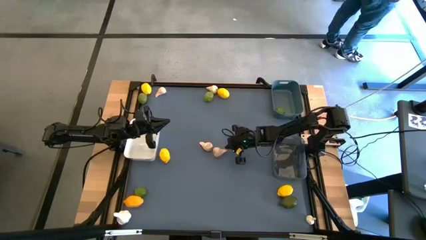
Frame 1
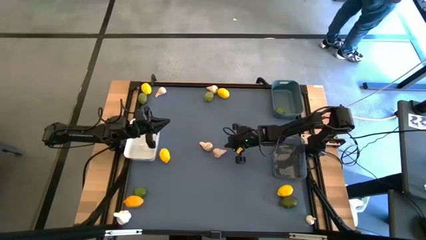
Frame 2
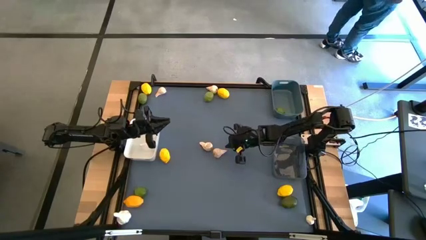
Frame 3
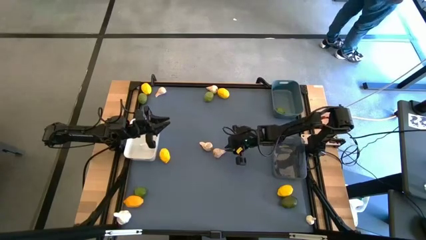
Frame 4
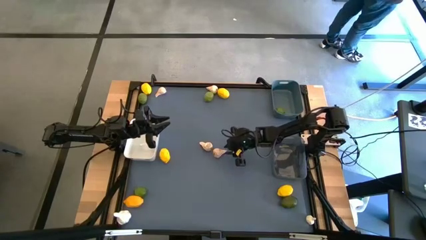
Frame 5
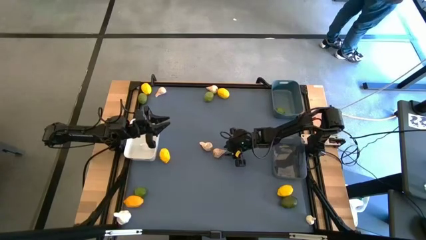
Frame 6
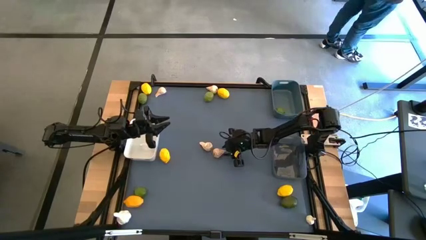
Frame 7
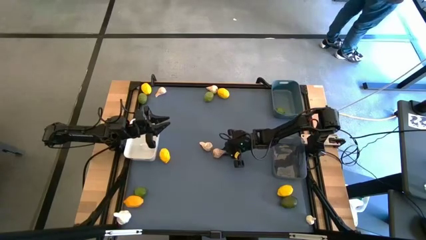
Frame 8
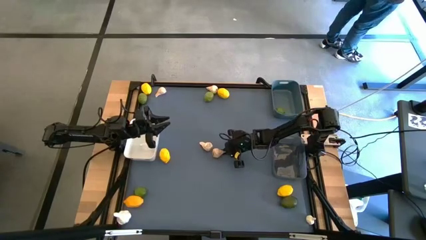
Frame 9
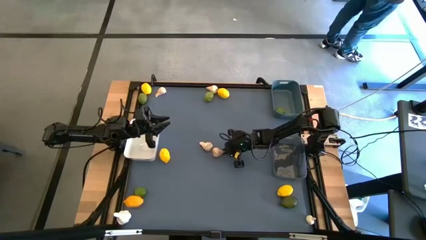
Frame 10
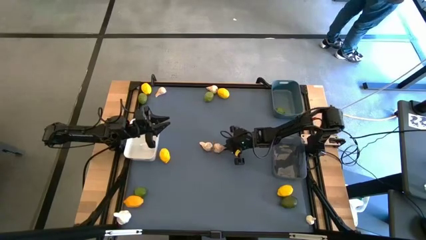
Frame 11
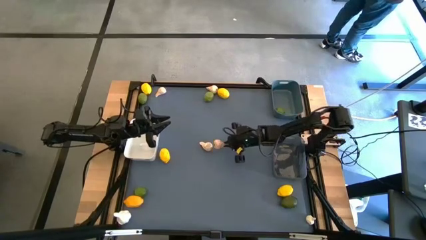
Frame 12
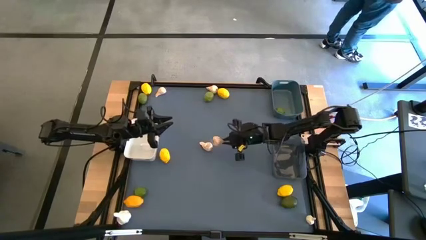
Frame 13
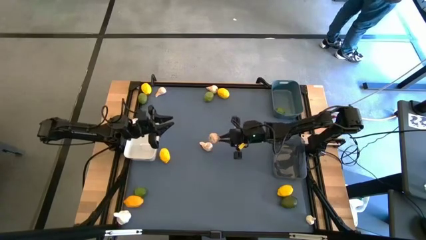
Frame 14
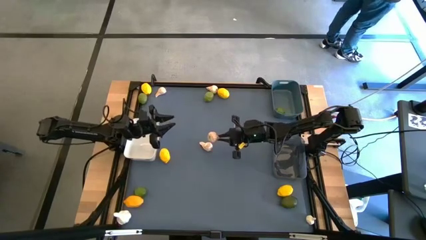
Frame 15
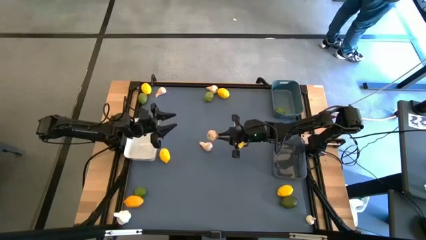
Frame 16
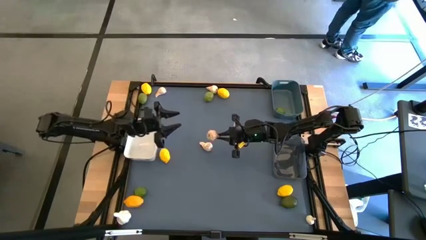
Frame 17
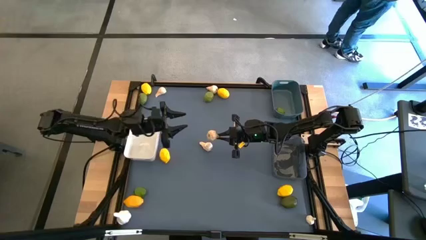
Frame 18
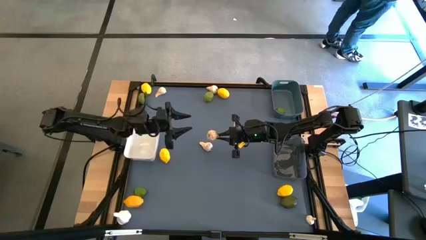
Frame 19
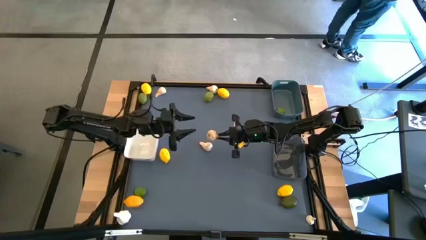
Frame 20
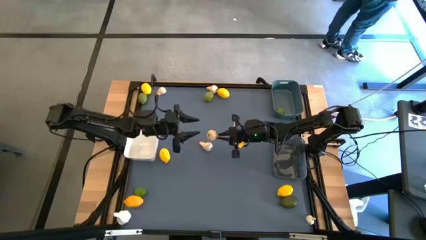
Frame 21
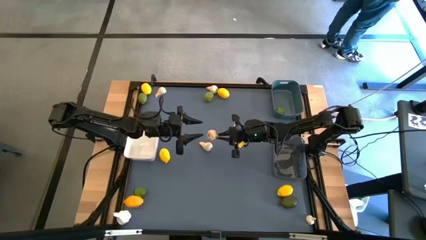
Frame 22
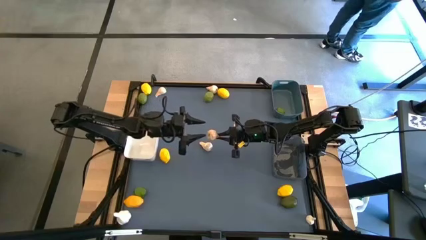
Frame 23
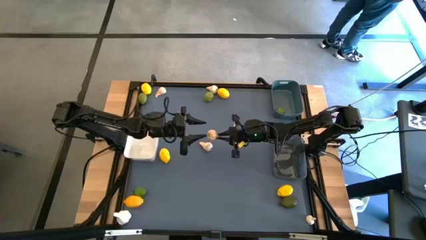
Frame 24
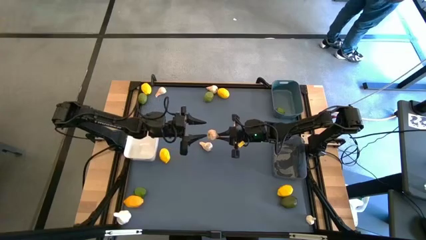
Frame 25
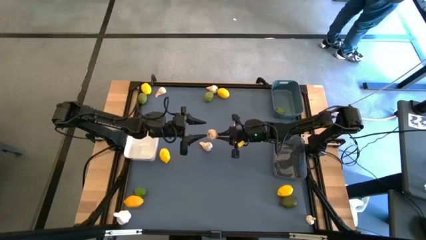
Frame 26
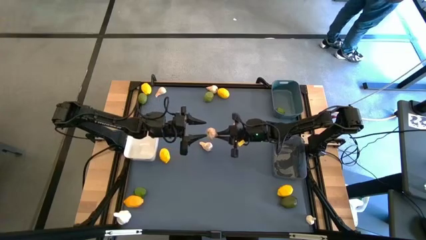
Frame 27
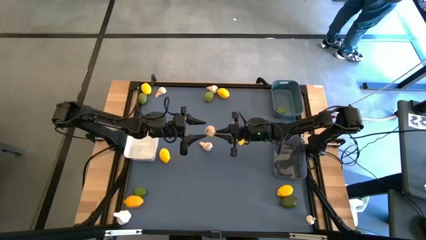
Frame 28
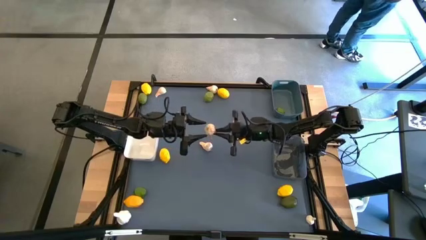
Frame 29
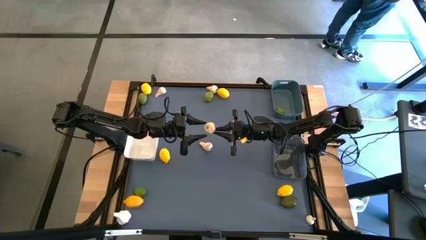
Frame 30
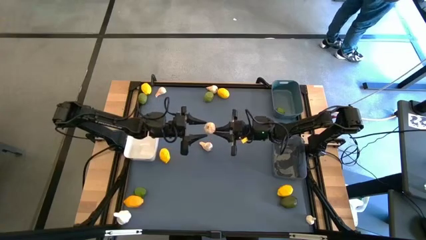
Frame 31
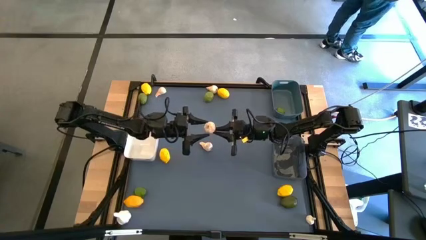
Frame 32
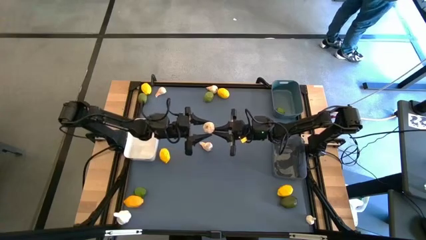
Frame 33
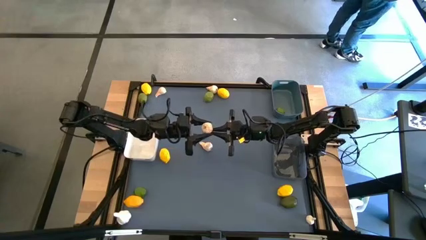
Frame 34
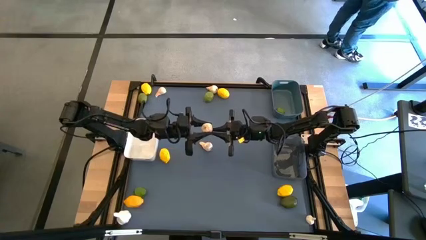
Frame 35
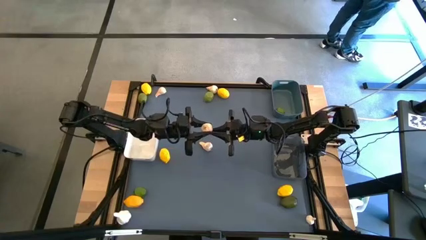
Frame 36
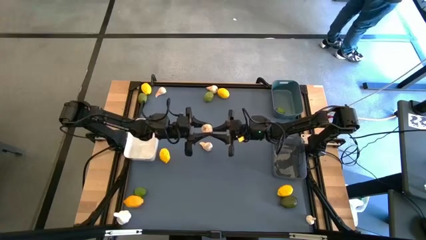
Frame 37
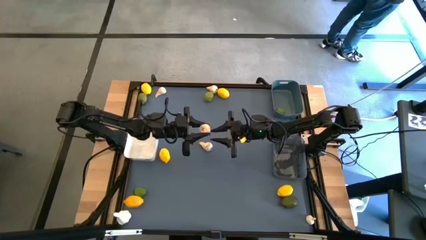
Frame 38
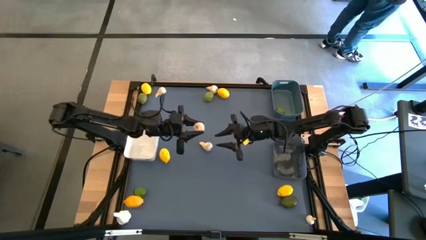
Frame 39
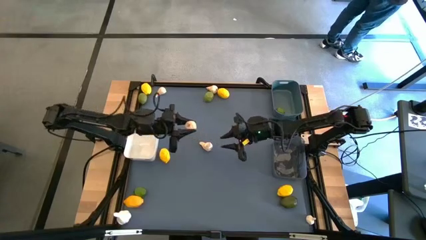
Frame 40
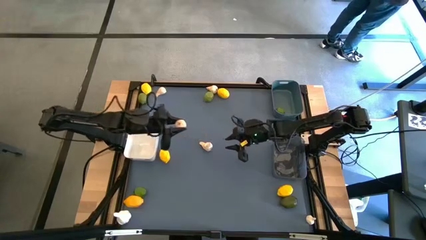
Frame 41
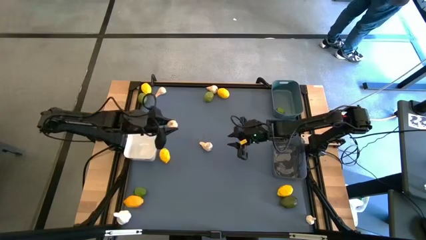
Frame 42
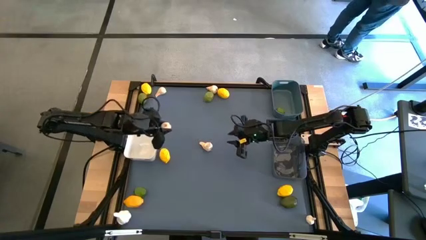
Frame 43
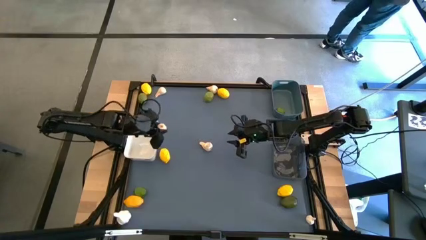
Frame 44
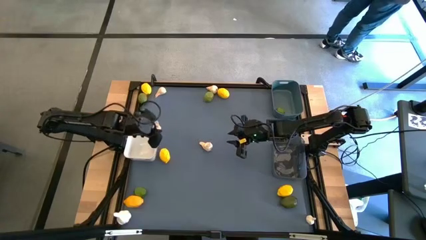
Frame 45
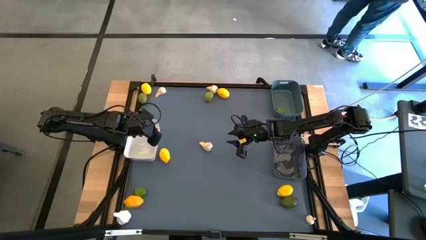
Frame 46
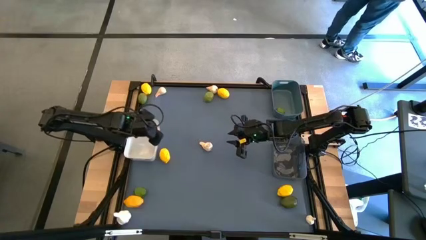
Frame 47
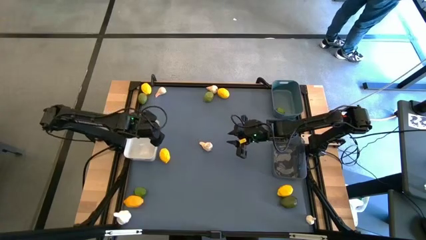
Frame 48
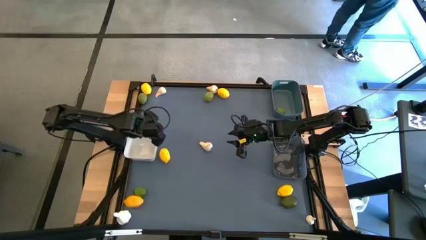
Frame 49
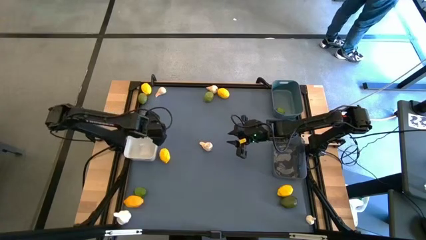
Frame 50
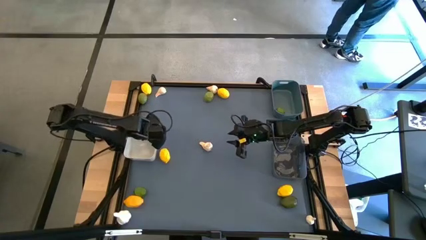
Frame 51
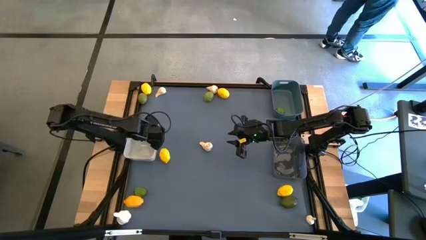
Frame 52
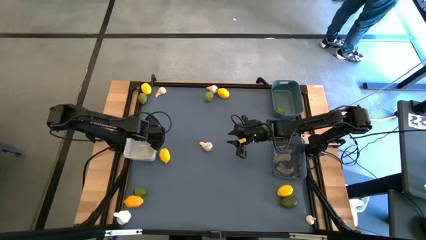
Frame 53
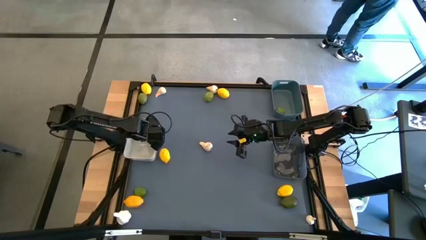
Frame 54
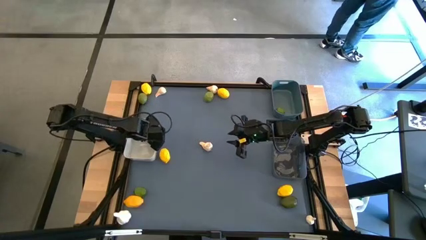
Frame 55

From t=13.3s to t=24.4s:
Task: Sort produce into baskets
Put the garlic into the white bin

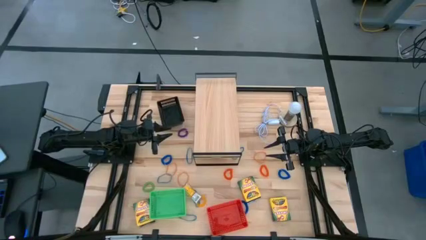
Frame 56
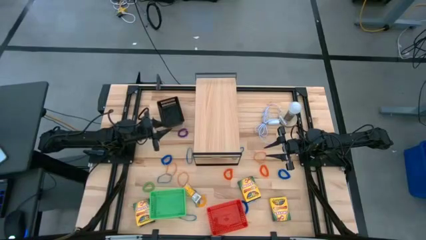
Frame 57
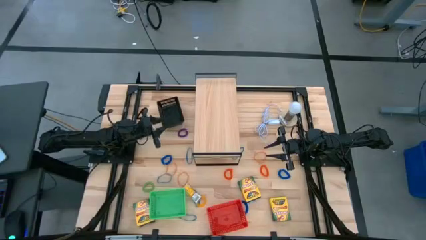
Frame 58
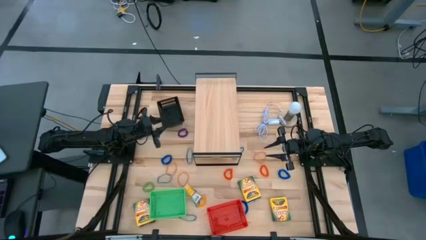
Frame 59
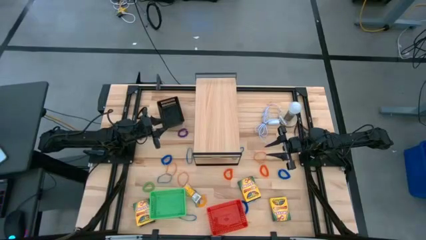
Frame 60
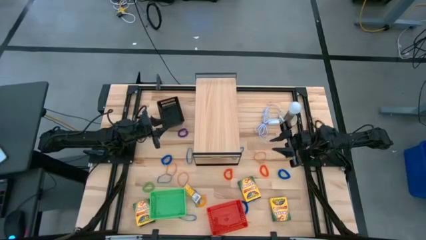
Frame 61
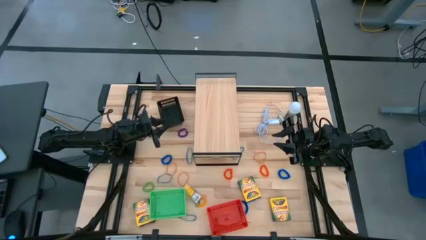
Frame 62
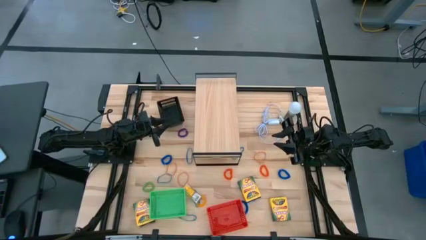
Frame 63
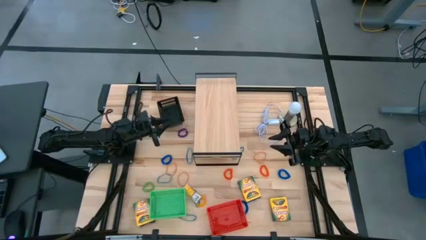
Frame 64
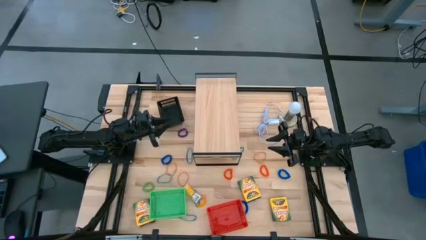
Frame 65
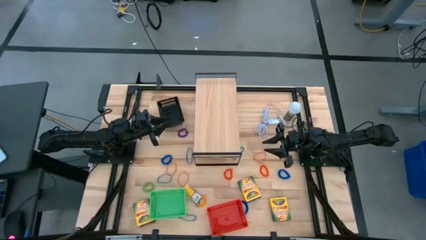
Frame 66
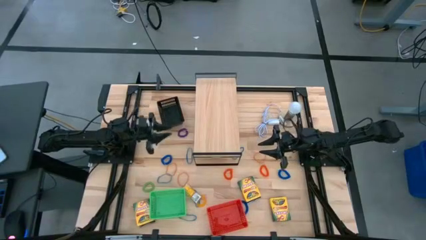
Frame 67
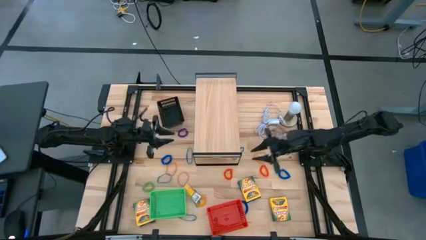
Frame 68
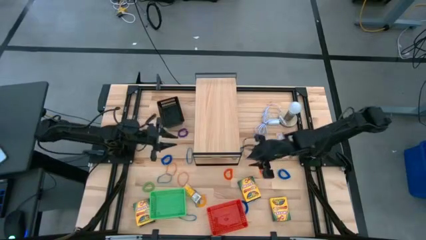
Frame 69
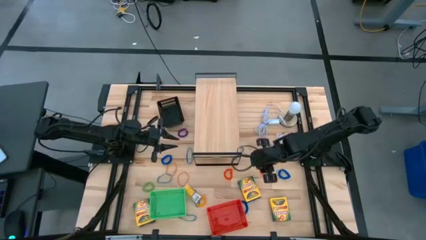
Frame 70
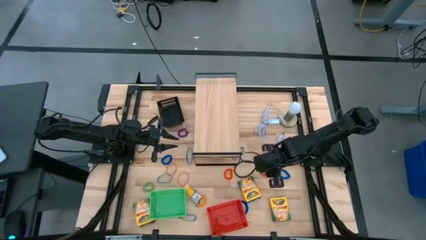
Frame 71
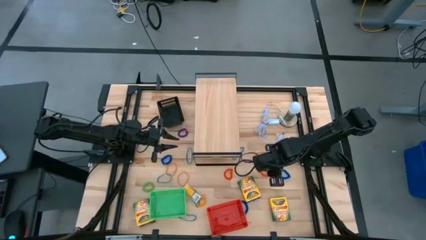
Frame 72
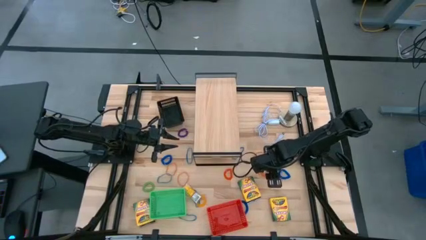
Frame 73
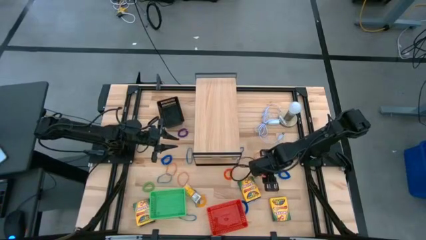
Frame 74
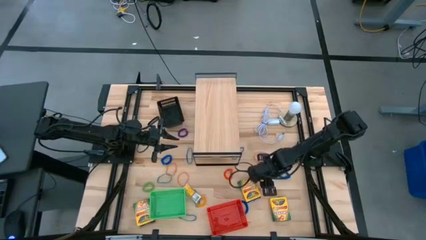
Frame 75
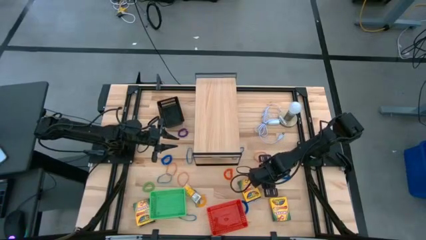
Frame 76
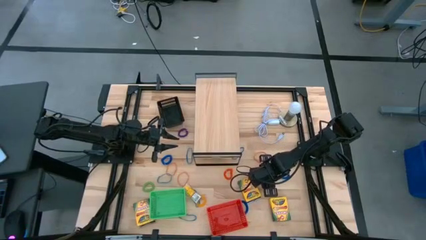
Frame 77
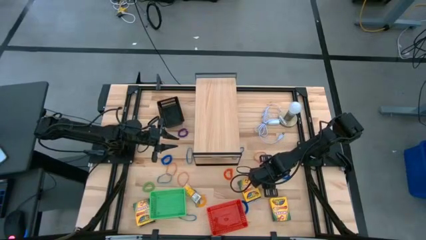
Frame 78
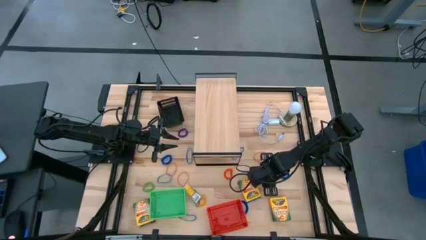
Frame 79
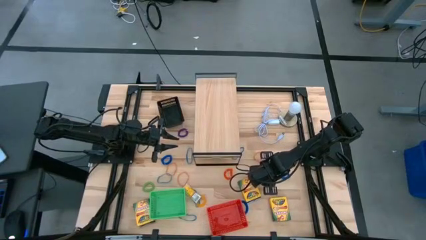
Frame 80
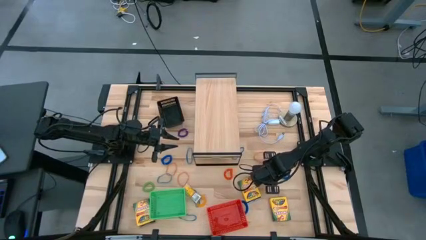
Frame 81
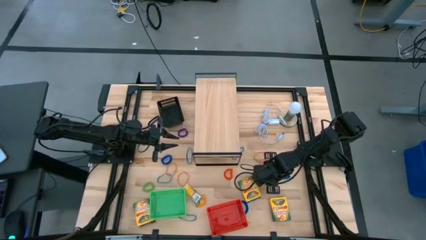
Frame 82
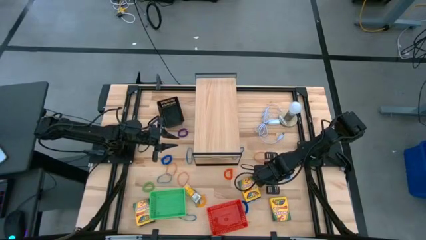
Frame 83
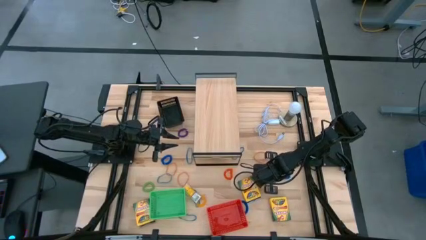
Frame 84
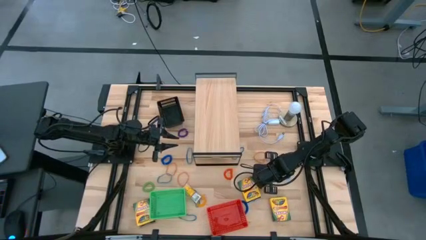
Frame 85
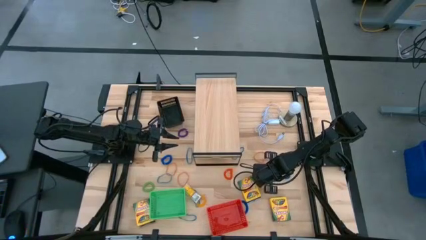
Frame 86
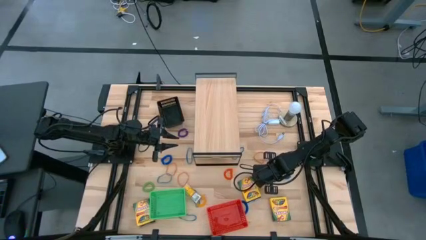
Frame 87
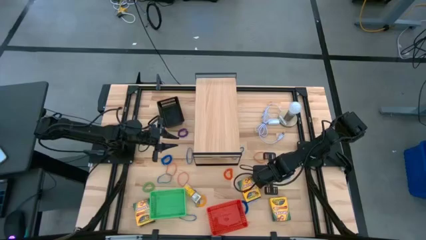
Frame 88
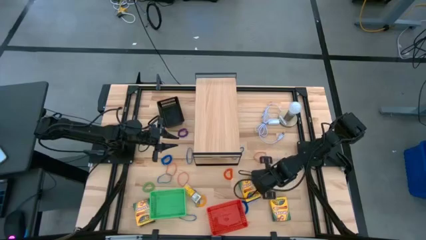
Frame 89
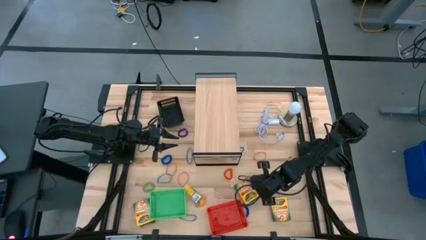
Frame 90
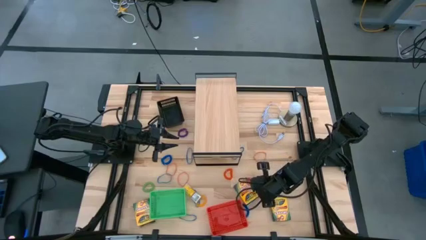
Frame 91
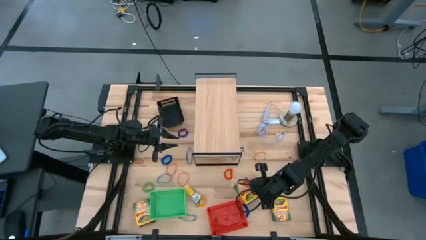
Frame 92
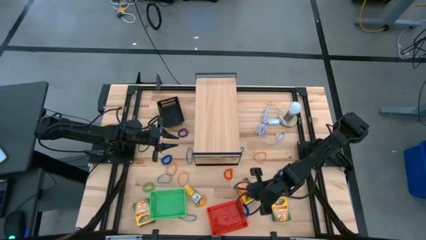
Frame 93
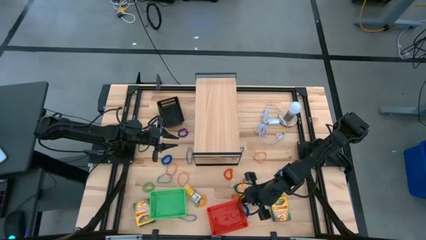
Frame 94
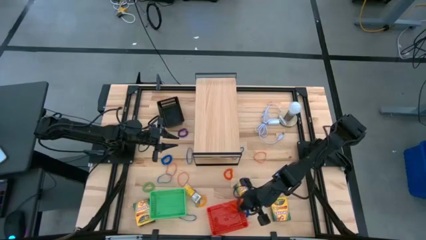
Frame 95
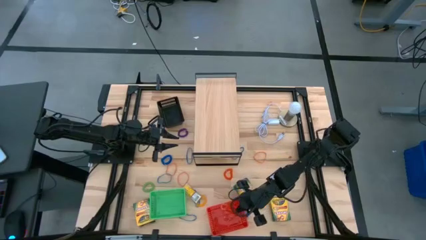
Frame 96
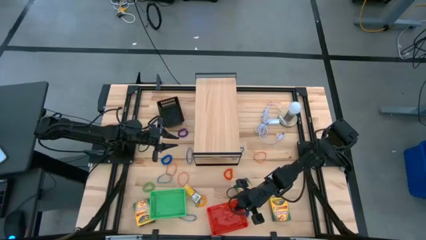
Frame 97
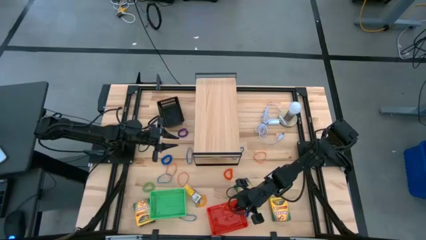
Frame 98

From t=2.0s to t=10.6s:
Task: Pick & Place Office Desk Supplies
Put the orange spring keychain into the red basket
